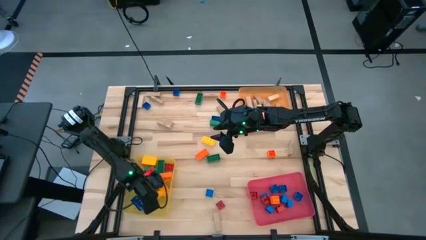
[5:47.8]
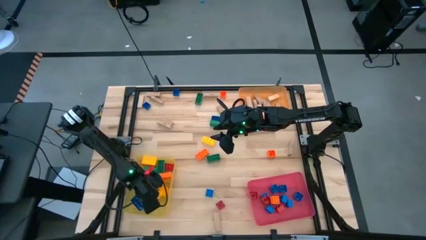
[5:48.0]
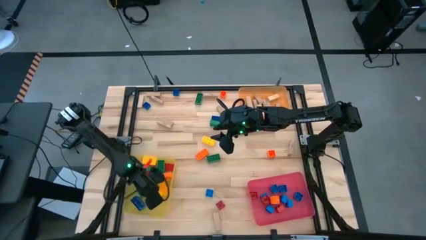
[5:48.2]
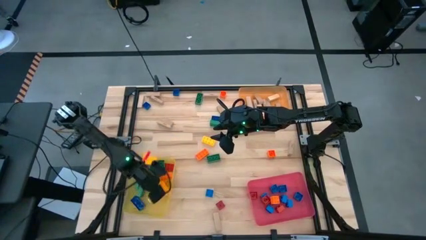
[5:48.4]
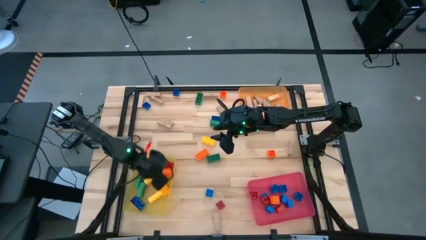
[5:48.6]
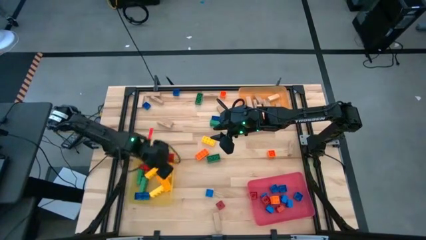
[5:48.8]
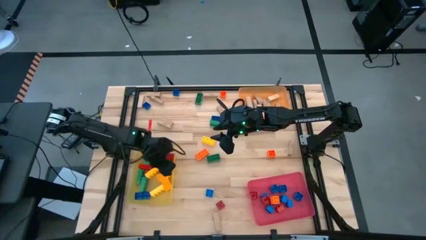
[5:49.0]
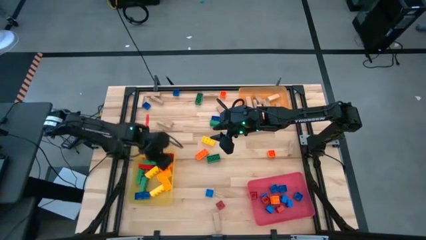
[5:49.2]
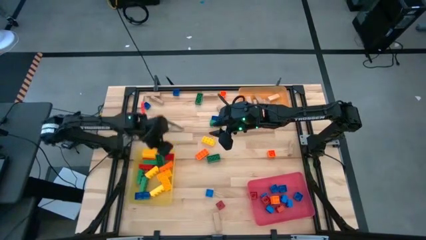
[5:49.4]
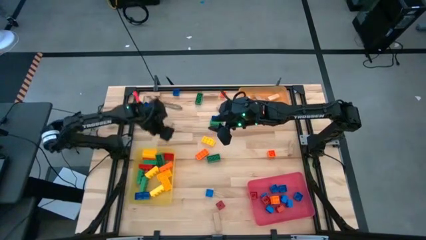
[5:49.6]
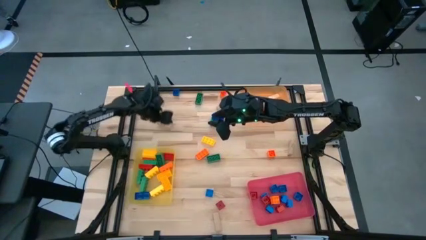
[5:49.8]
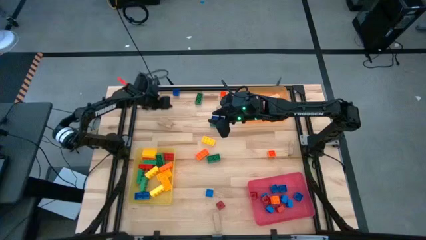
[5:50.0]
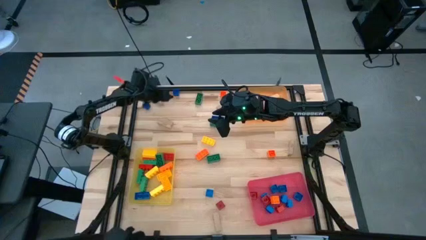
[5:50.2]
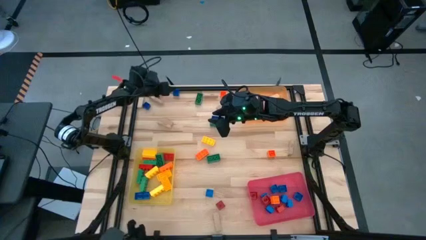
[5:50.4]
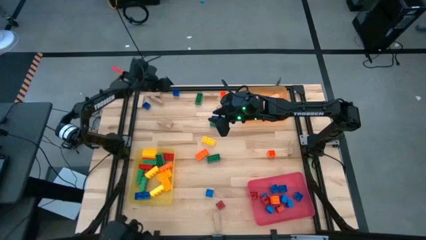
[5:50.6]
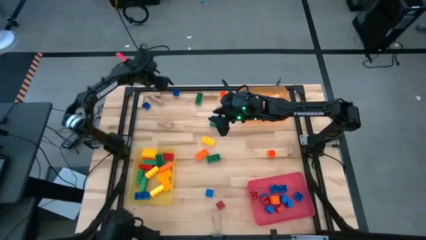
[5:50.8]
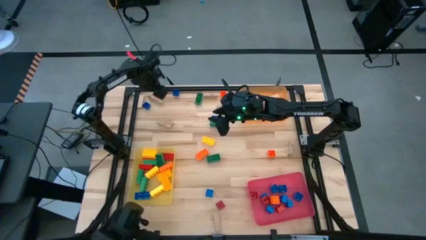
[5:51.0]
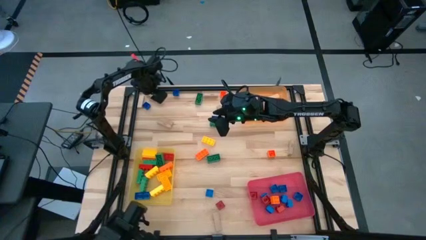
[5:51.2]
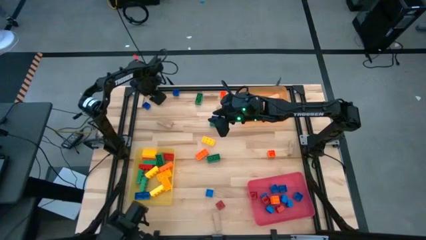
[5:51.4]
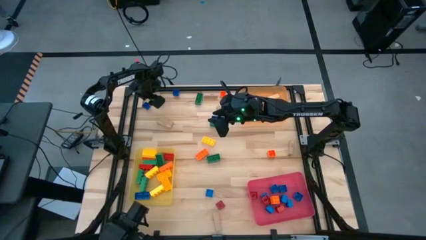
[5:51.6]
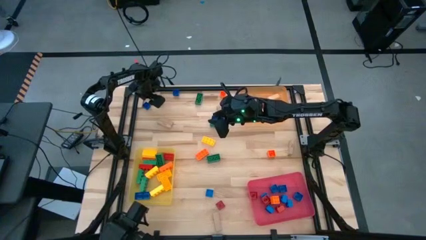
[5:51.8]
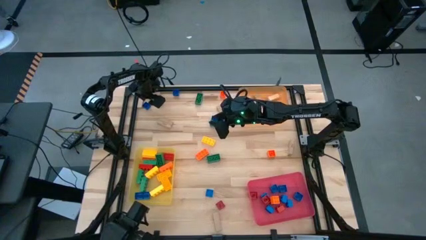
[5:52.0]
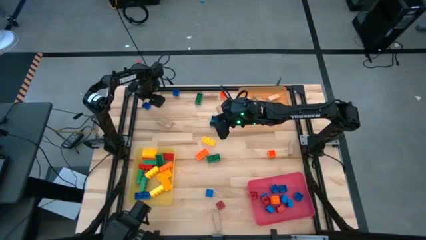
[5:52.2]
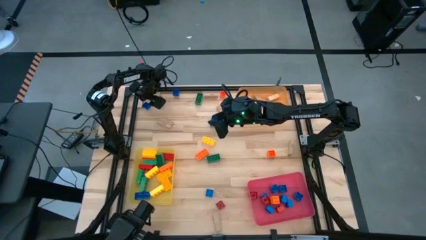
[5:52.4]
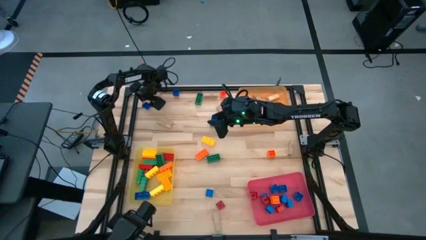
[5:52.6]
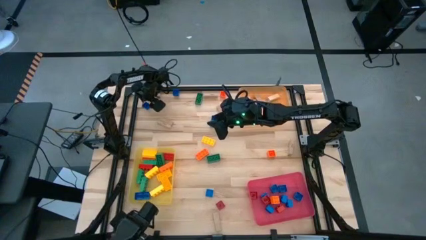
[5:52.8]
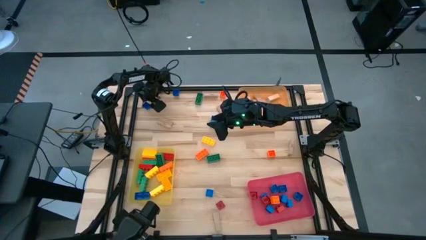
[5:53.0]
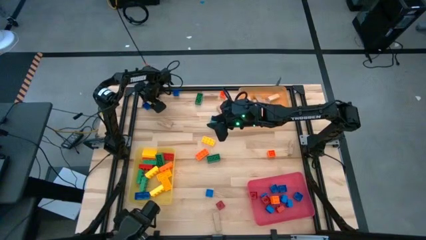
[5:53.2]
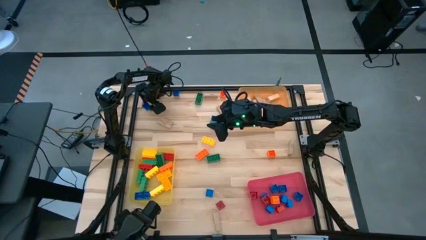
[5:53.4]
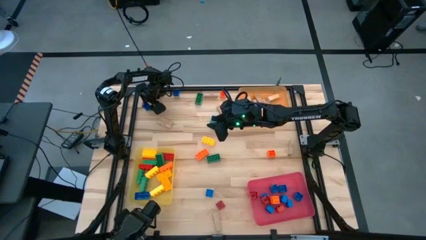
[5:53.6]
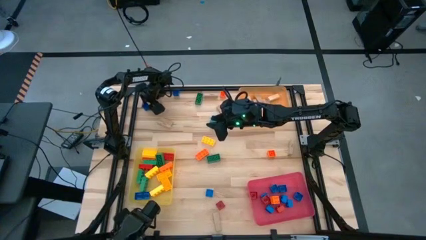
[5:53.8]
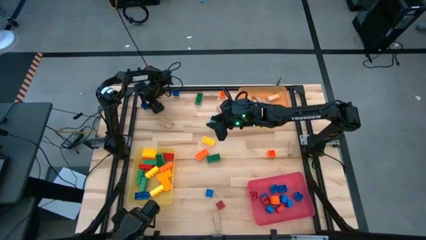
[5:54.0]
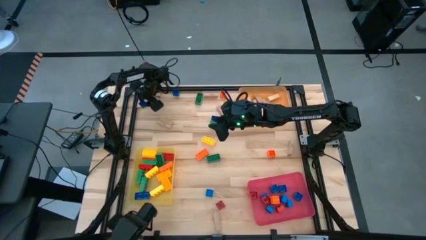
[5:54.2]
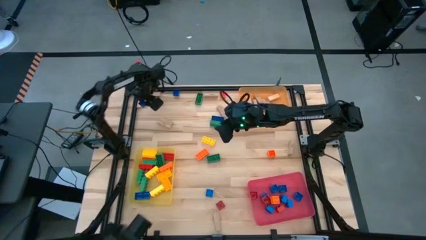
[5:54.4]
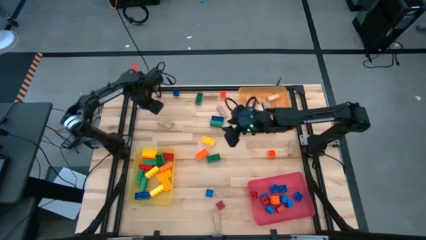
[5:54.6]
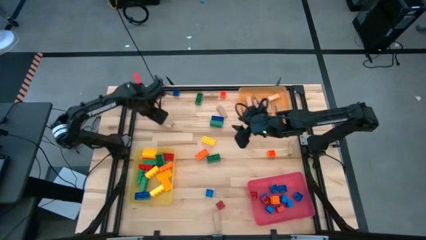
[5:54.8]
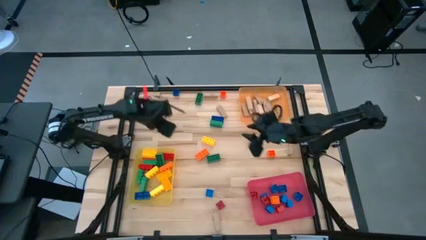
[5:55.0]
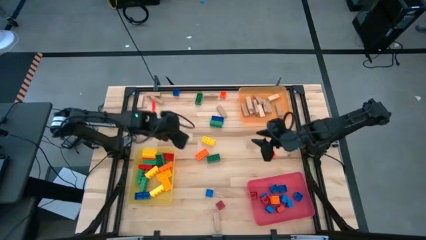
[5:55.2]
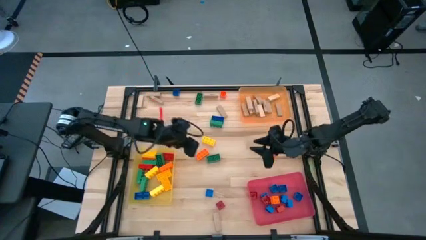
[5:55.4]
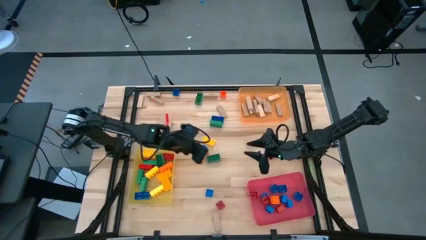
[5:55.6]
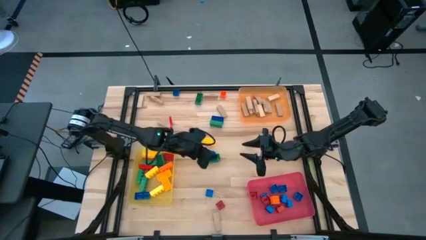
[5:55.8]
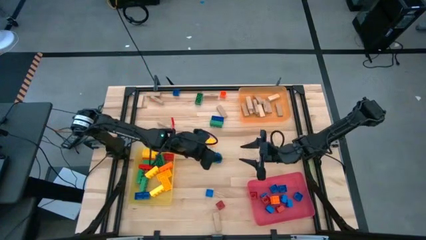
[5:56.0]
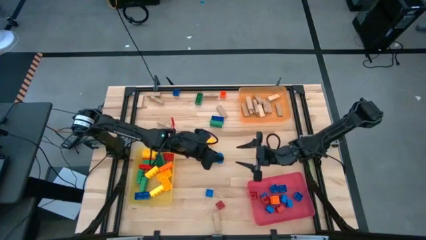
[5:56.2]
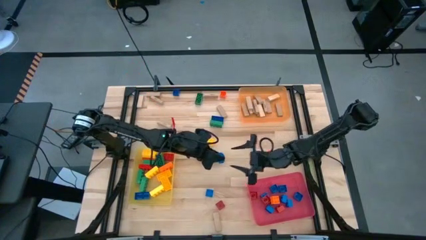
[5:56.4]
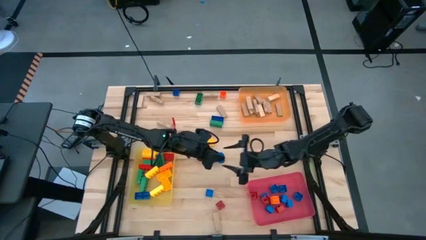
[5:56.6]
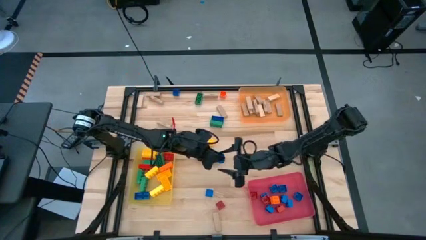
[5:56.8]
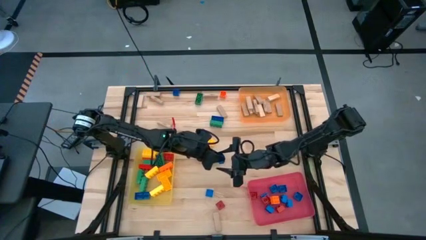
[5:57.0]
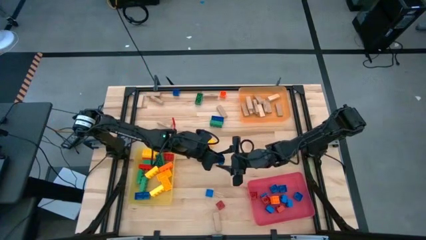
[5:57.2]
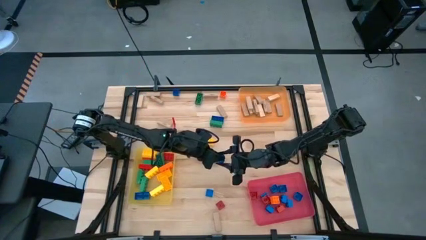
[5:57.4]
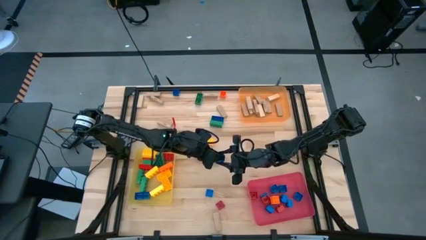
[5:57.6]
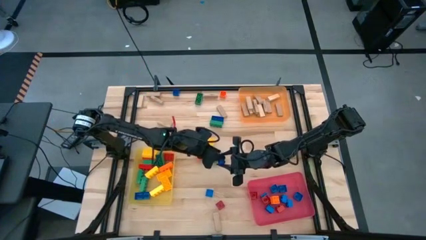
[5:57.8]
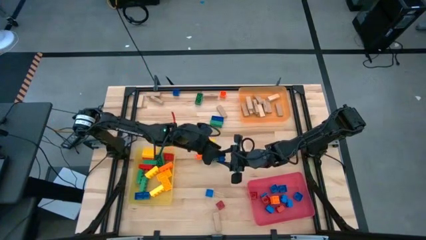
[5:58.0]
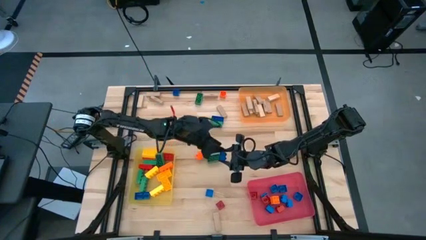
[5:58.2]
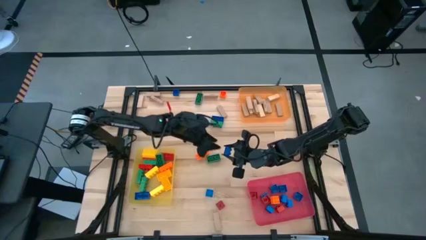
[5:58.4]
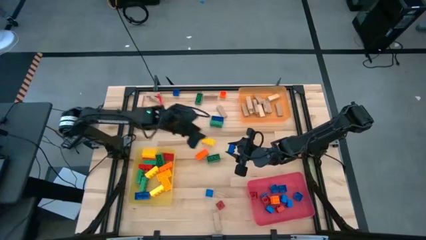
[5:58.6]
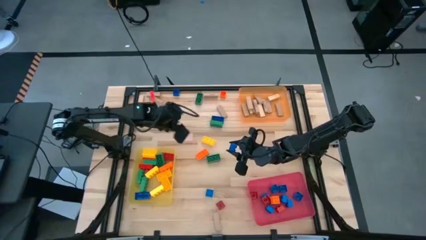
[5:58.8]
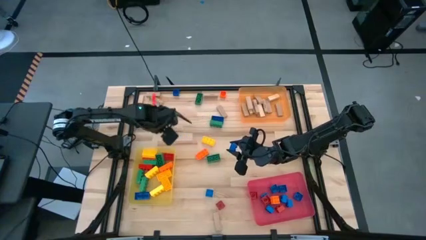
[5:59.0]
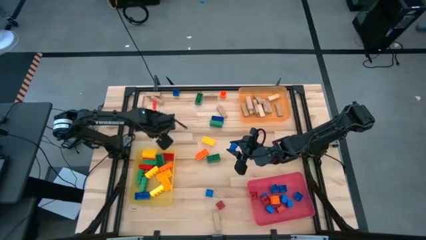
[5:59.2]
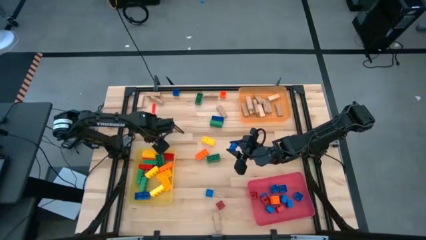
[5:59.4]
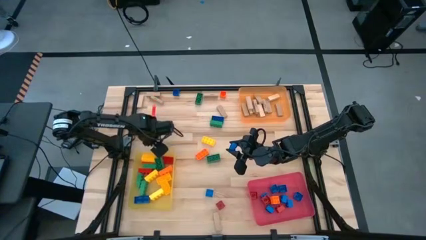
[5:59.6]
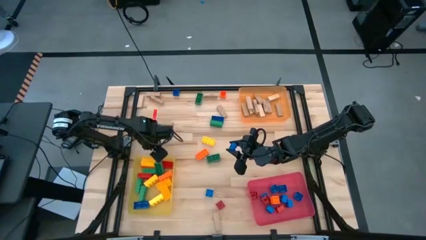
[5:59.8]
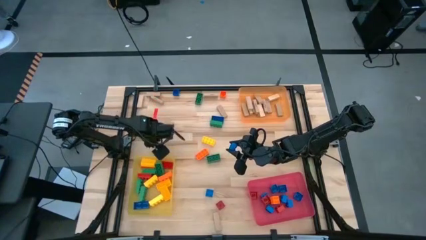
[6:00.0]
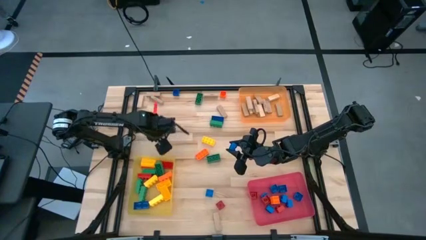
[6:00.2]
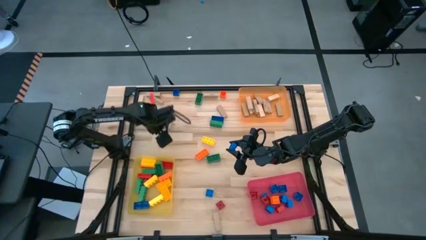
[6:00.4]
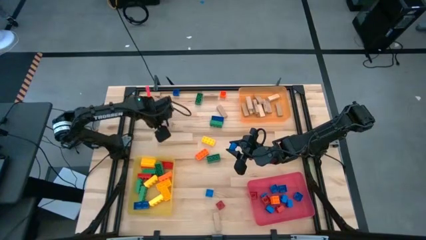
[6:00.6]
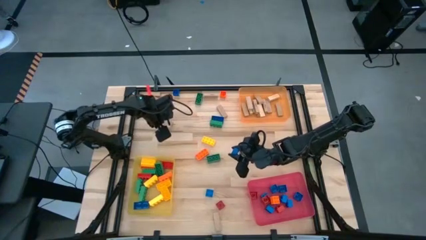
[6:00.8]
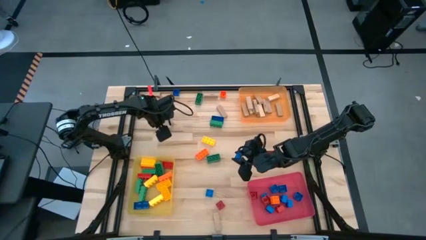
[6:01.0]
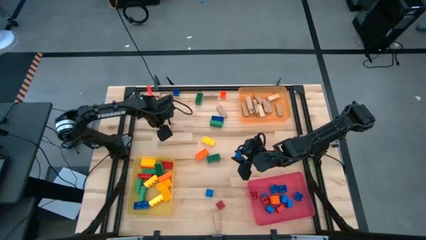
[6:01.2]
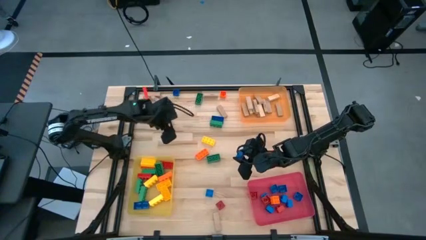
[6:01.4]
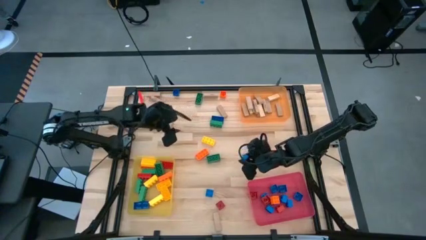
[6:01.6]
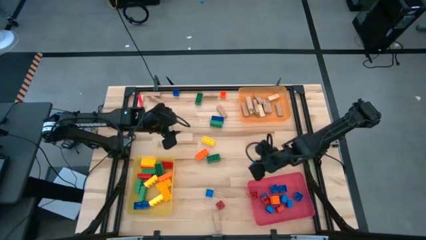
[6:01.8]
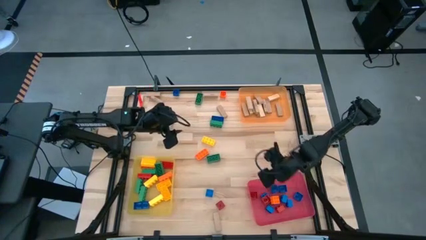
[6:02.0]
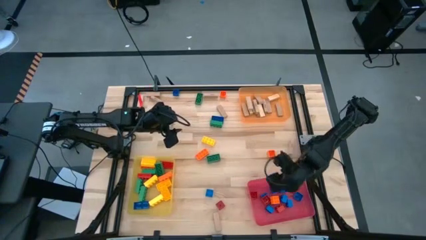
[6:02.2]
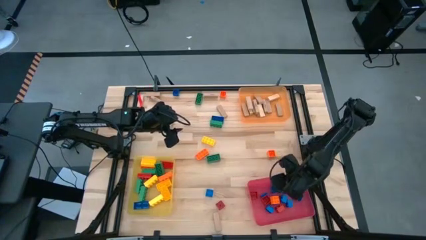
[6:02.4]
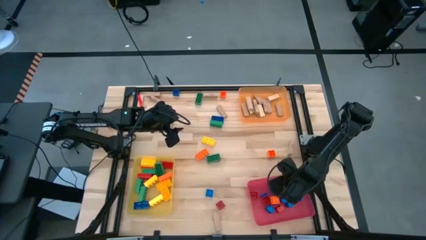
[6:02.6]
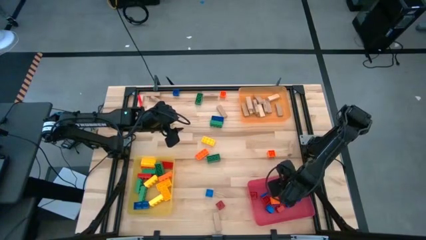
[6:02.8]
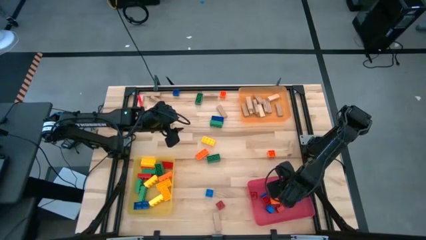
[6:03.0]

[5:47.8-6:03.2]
Task: Sort blocks by size
Put the small blue game piece into the red bin
